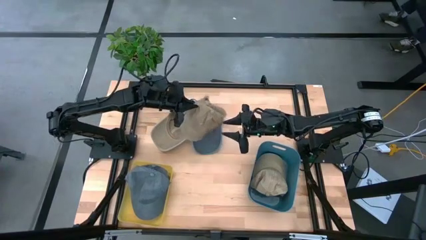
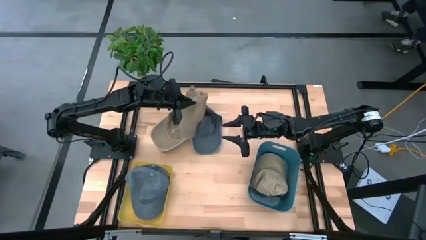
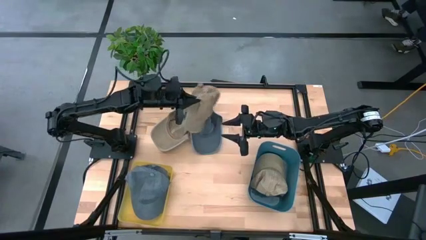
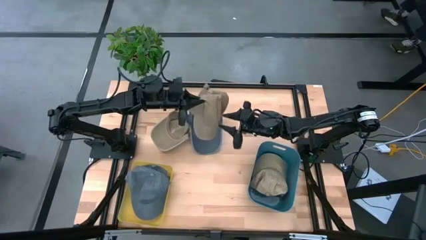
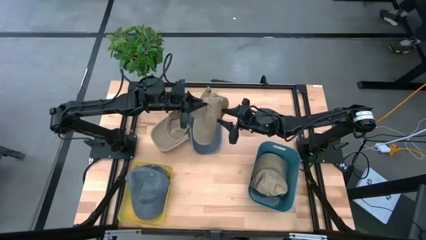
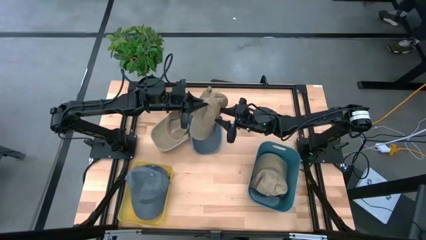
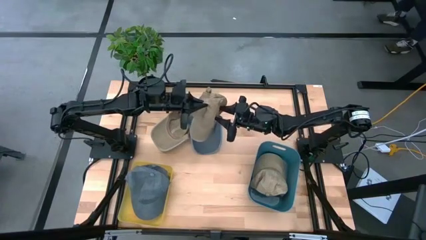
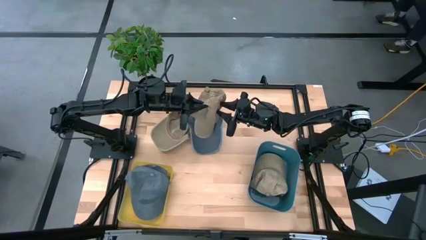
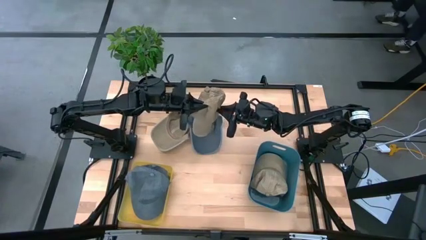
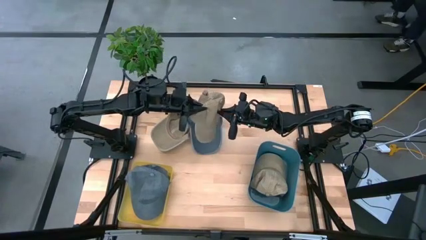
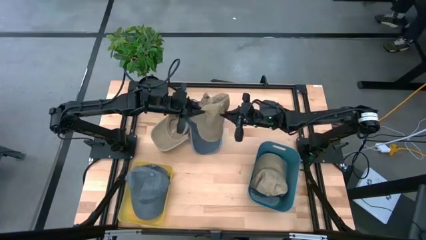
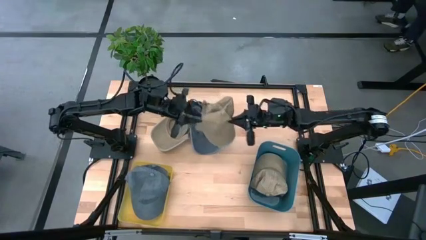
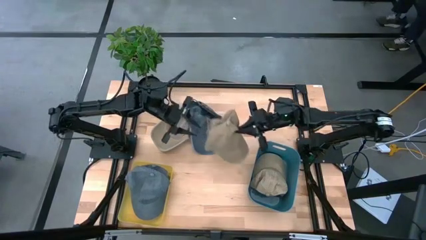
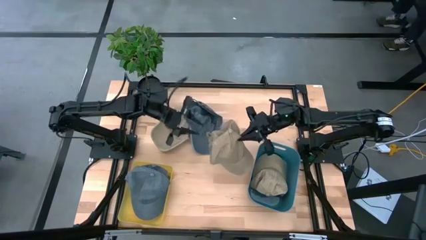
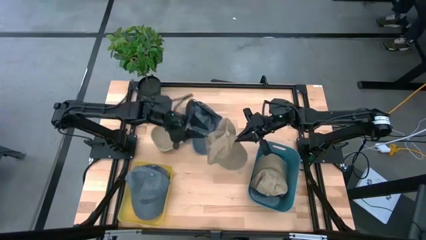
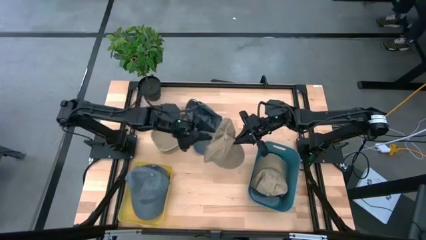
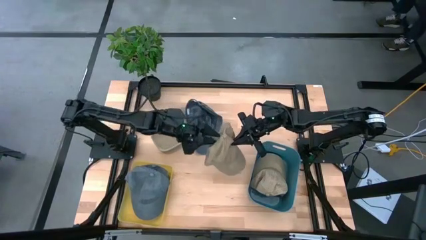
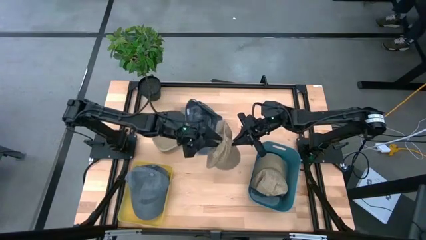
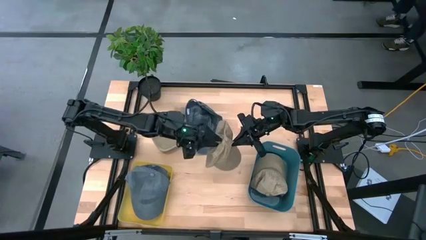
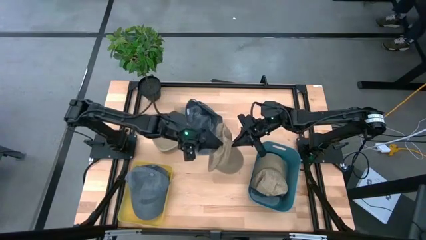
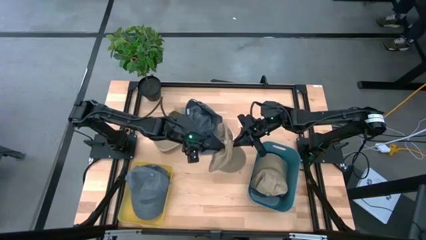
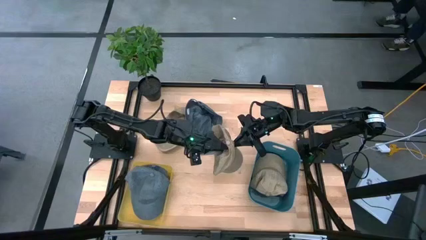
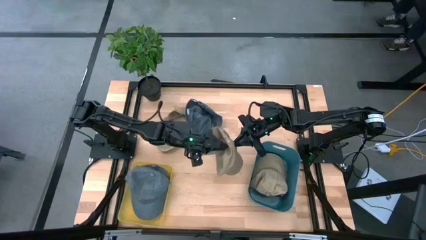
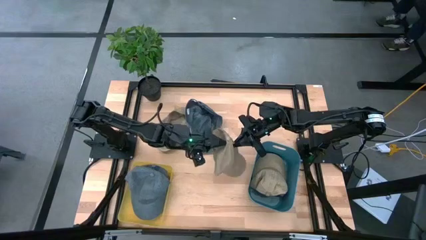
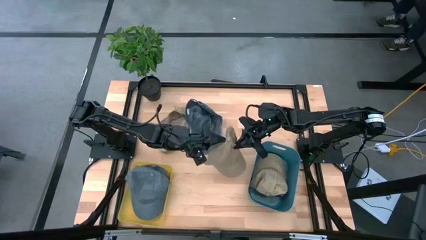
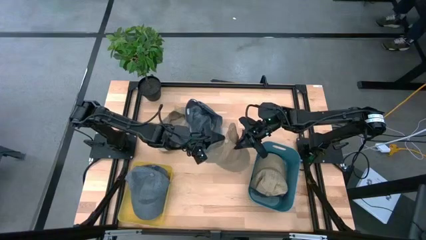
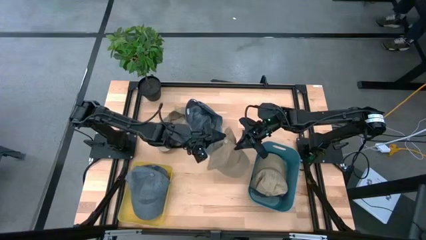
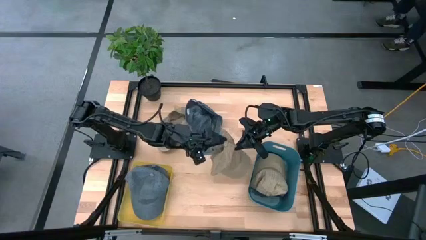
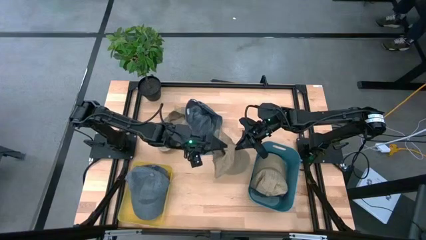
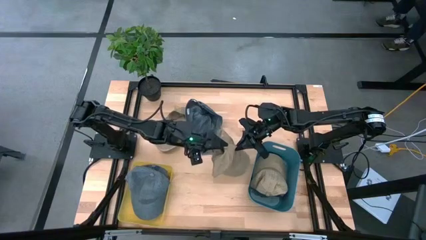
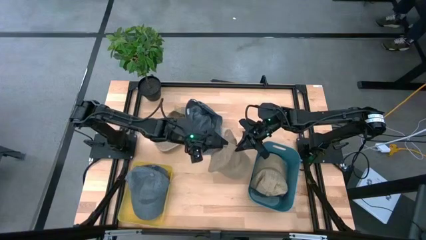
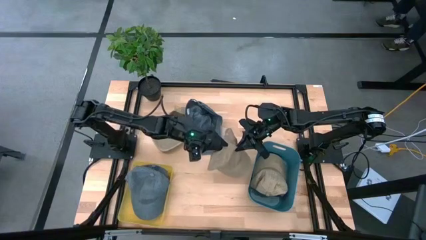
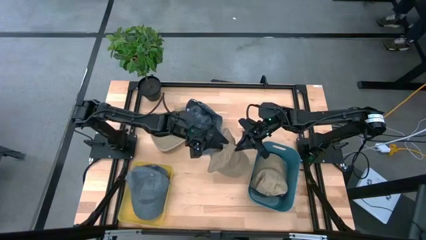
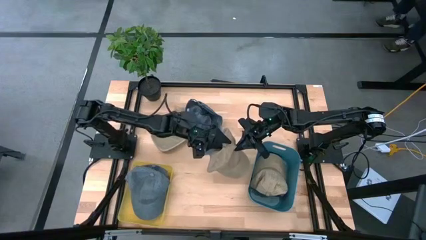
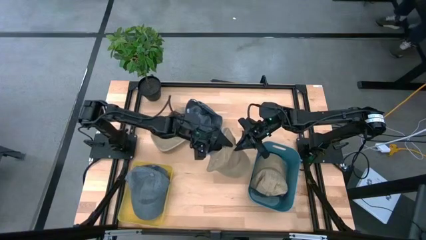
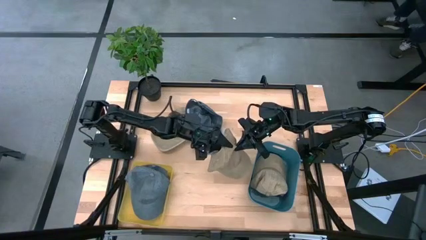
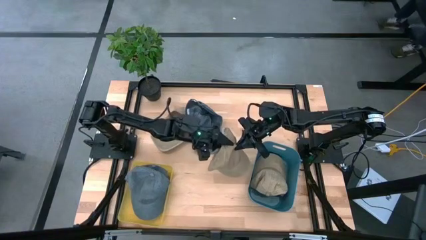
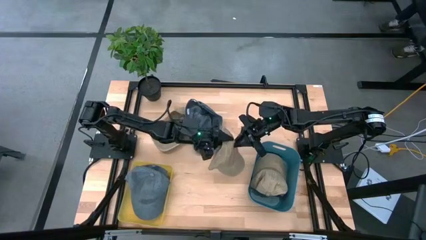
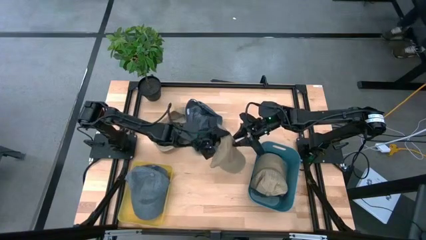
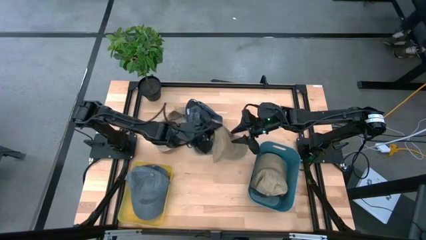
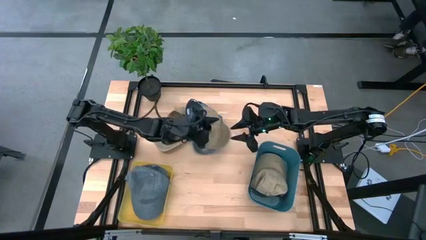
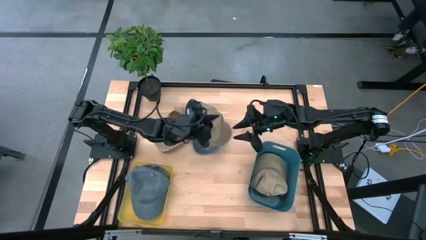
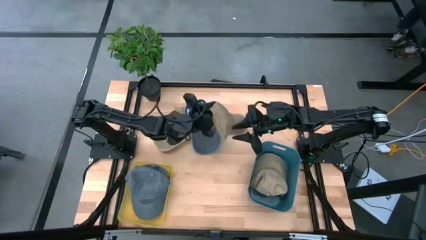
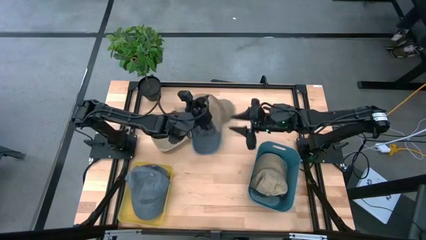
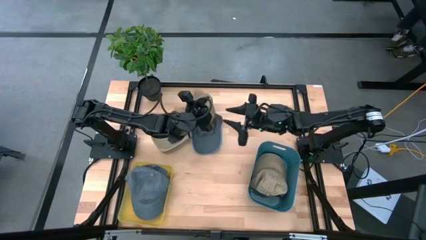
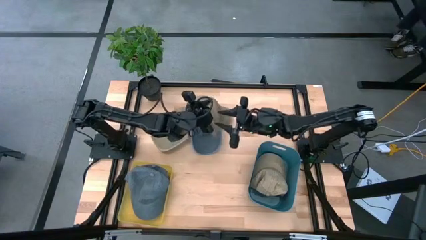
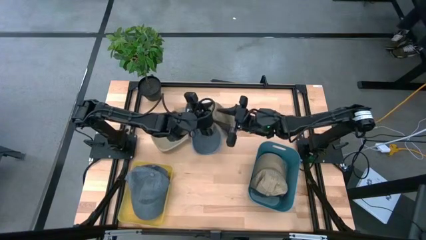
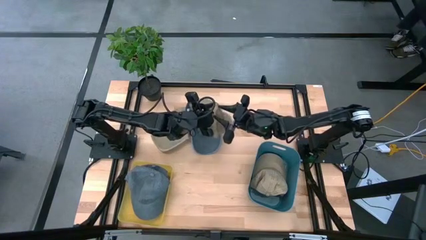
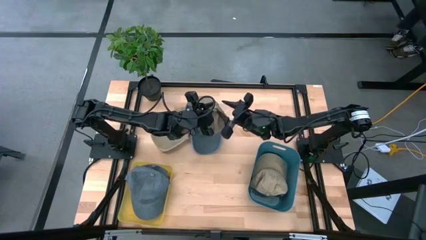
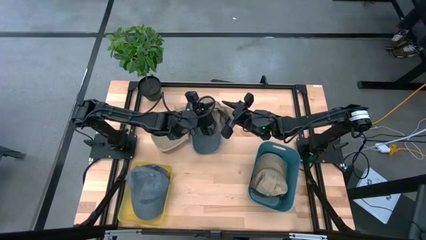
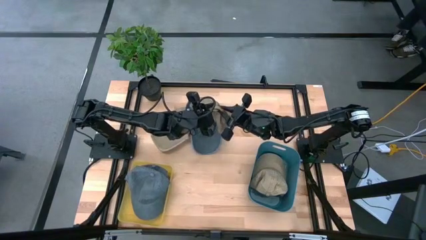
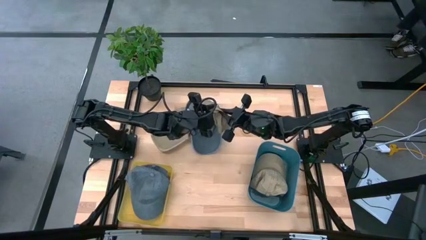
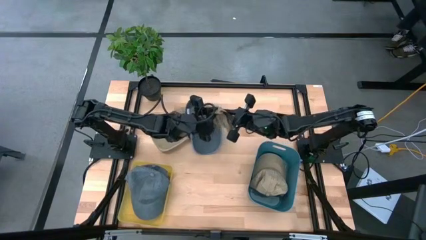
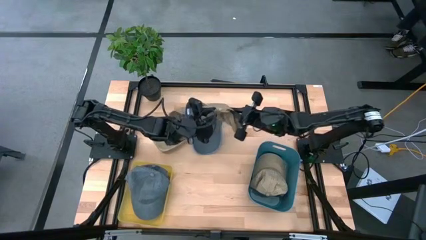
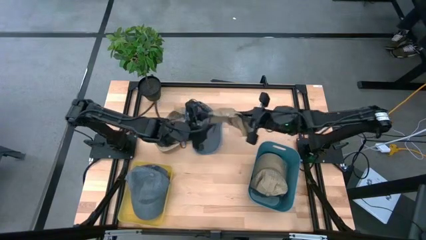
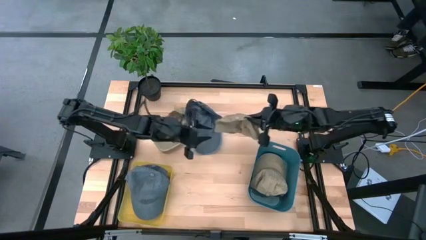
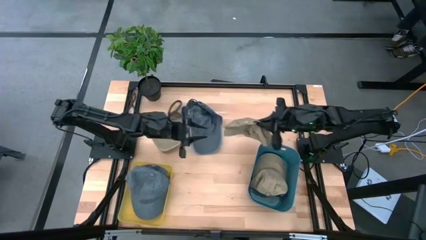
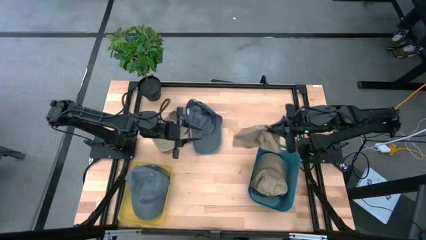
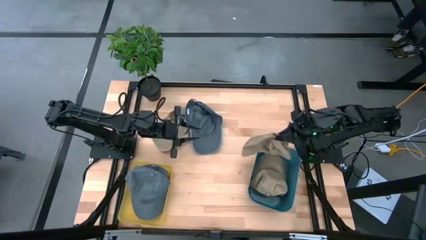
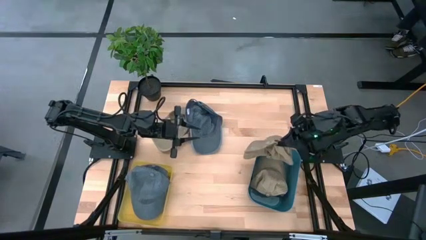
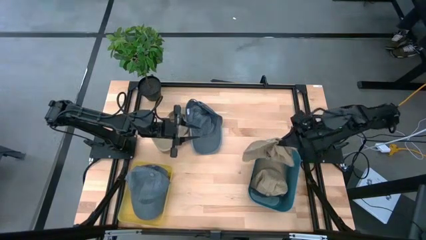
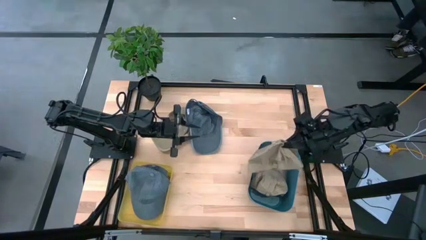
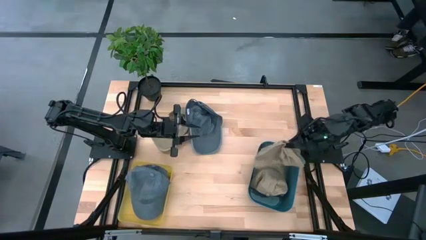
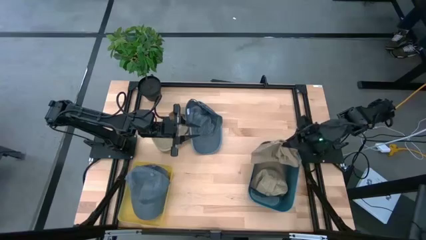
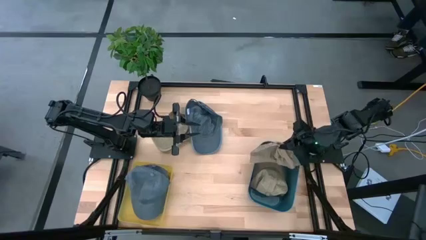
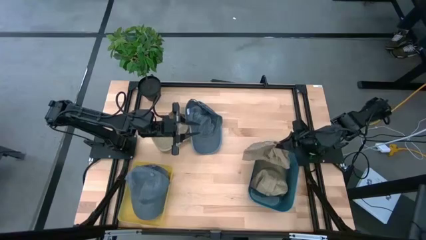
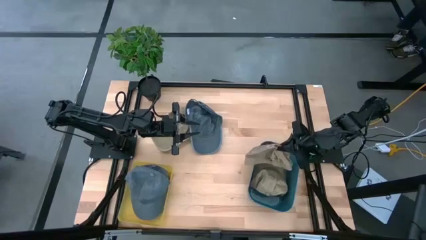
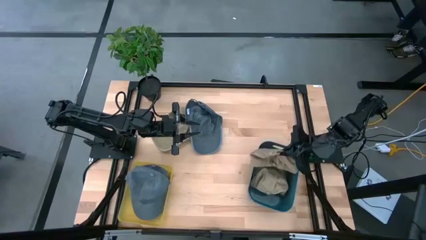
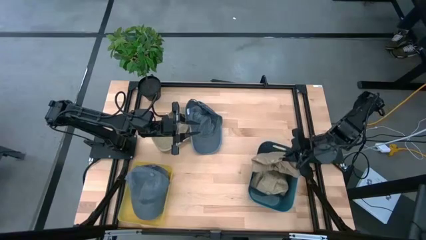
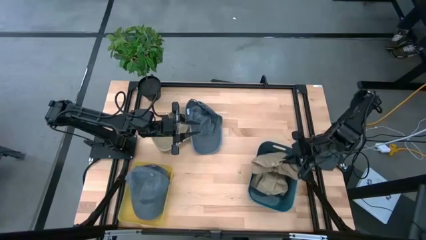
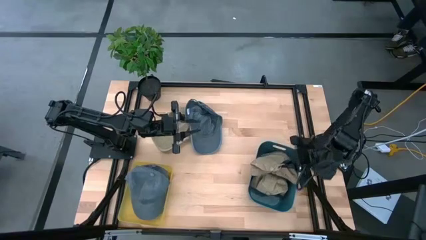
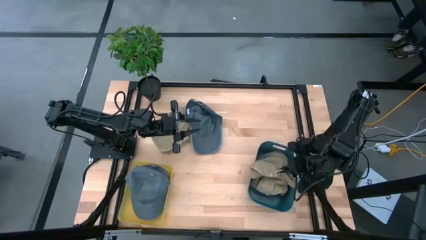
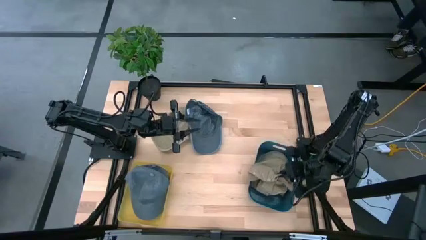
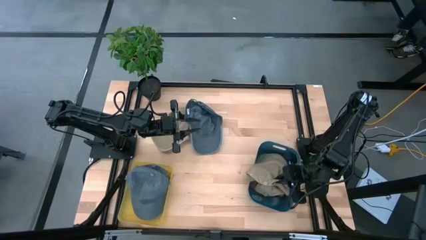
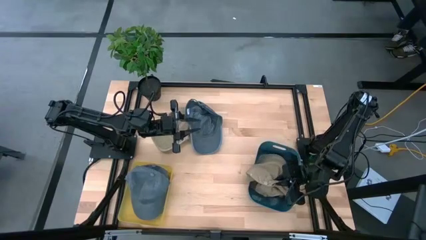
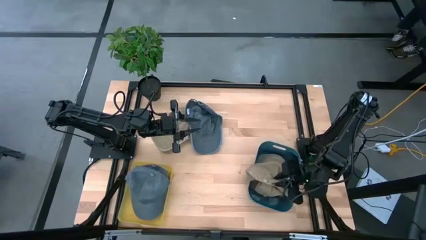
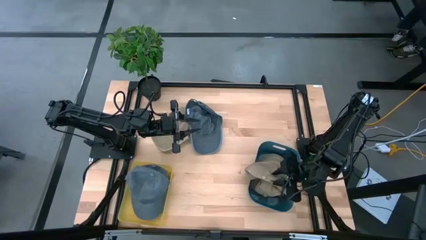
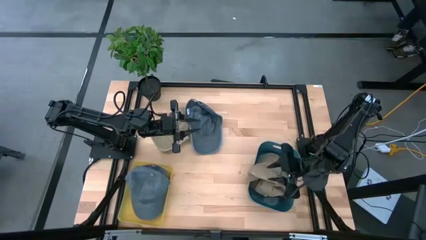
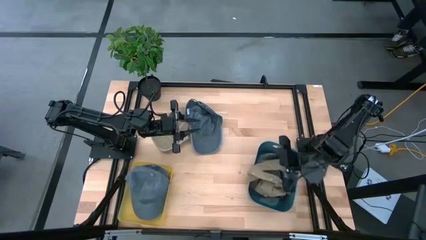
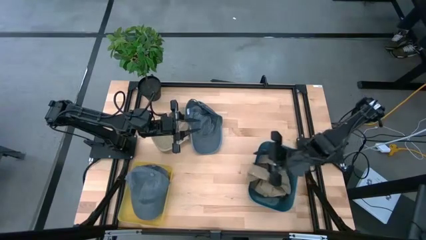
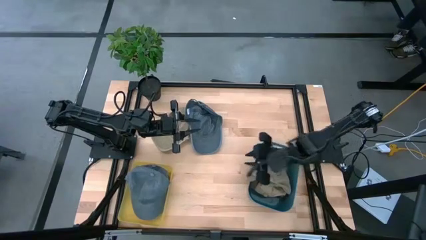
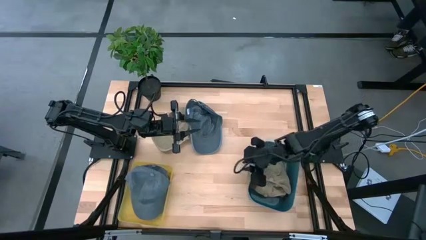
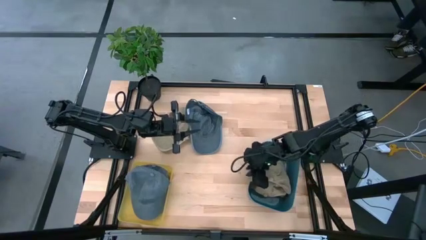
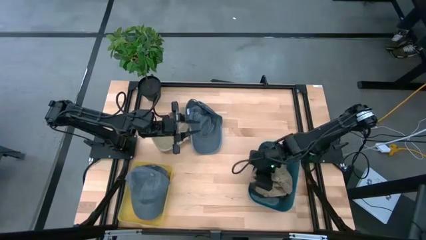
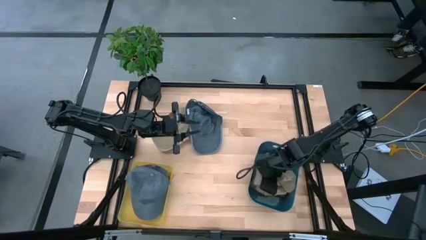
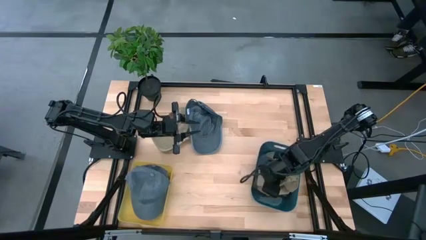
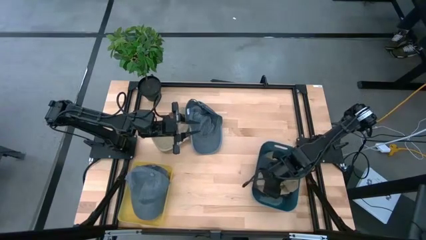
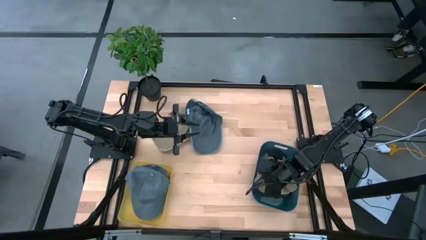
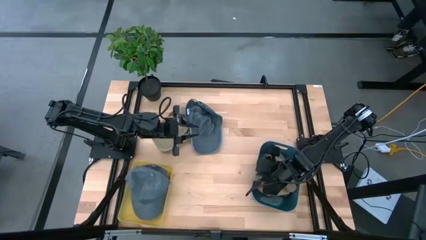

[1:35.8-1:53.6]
Task: Pick & Place hat
Put the right brown cap into the blue bin
